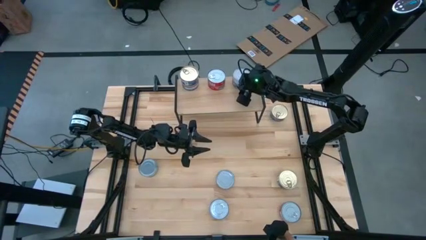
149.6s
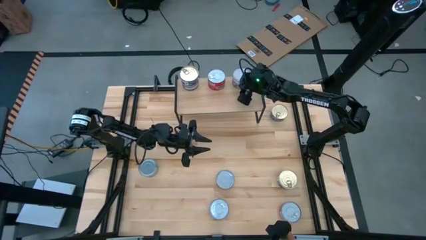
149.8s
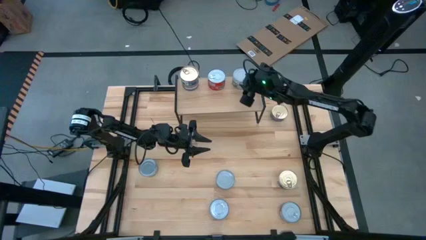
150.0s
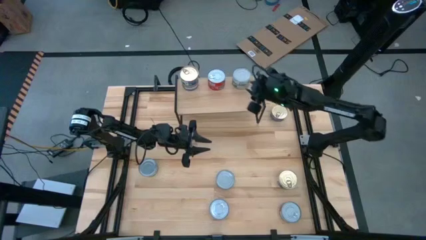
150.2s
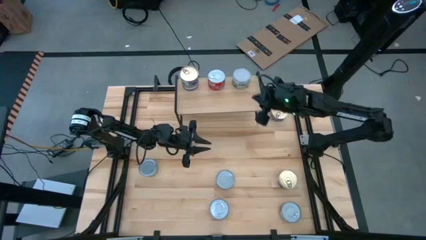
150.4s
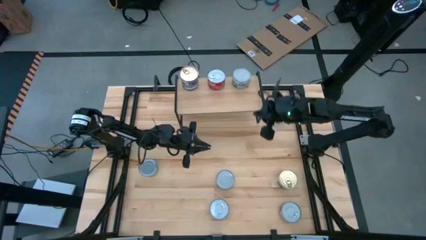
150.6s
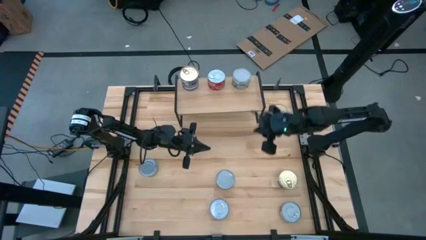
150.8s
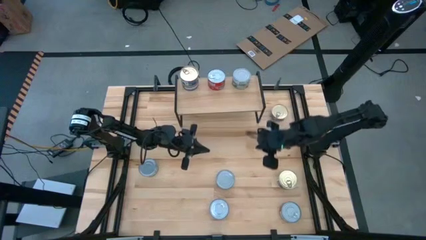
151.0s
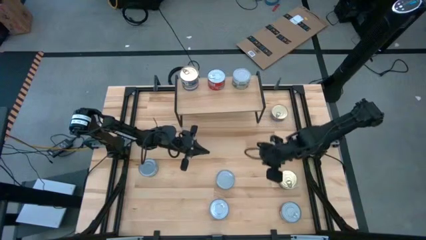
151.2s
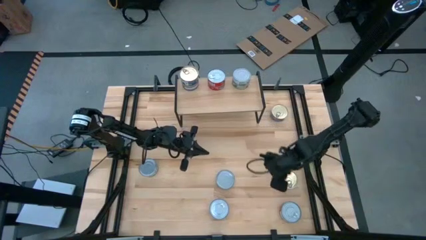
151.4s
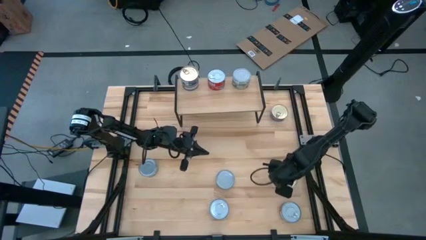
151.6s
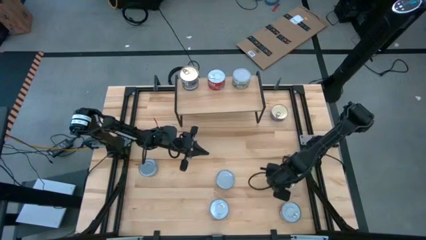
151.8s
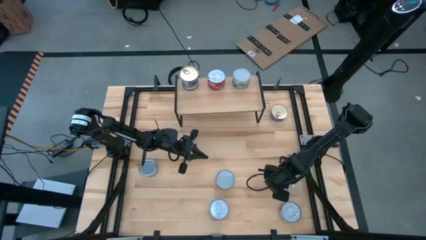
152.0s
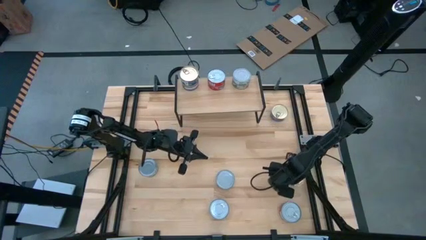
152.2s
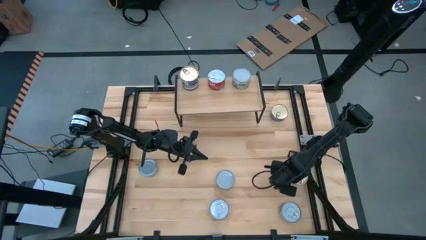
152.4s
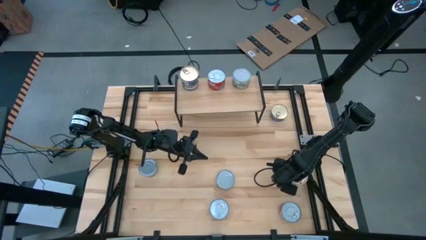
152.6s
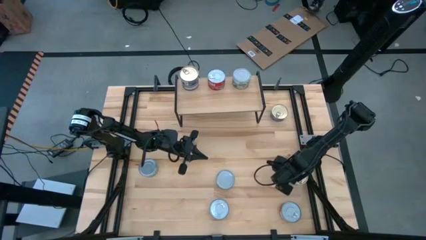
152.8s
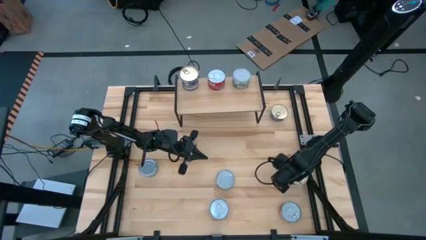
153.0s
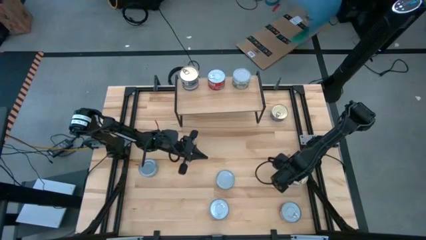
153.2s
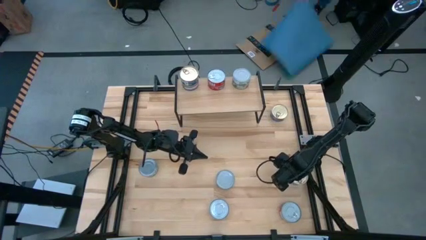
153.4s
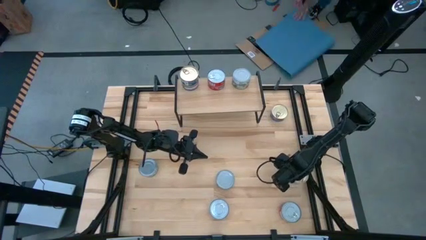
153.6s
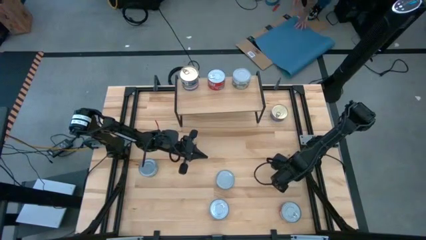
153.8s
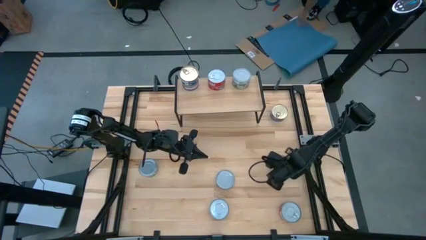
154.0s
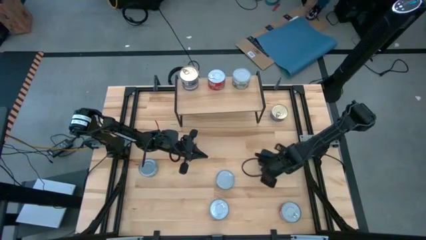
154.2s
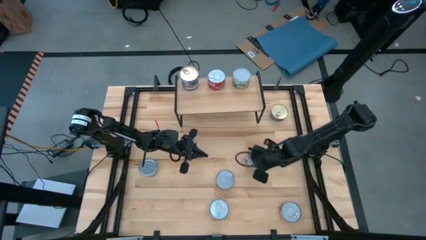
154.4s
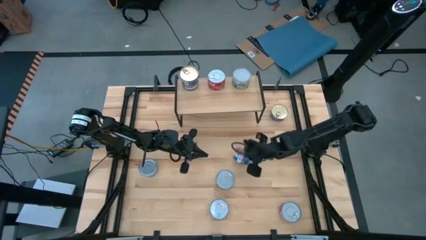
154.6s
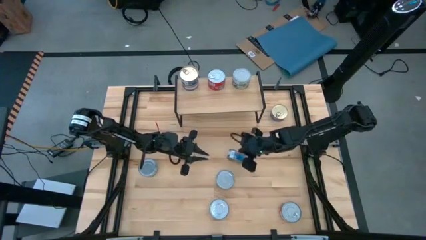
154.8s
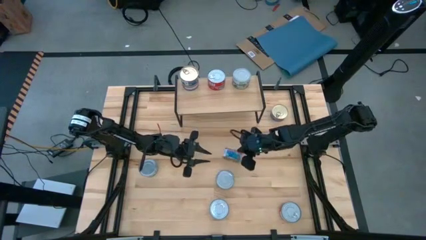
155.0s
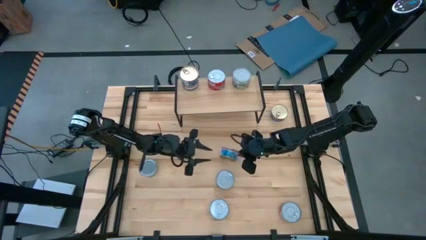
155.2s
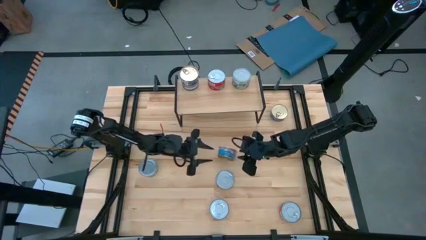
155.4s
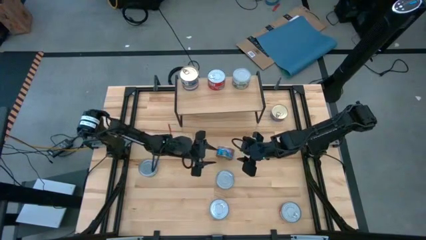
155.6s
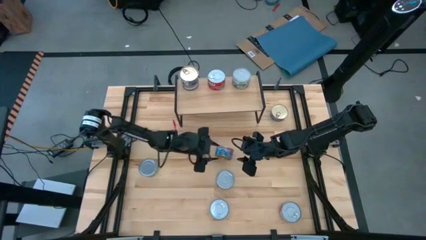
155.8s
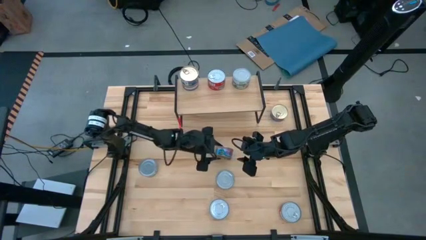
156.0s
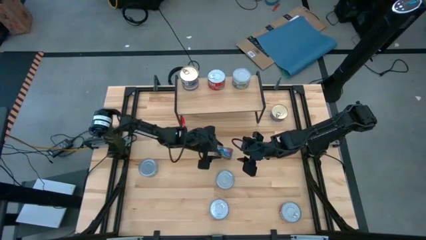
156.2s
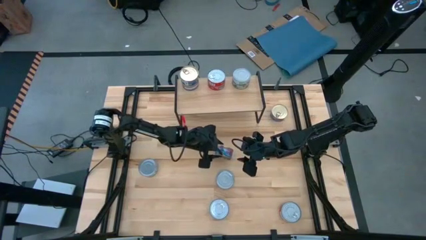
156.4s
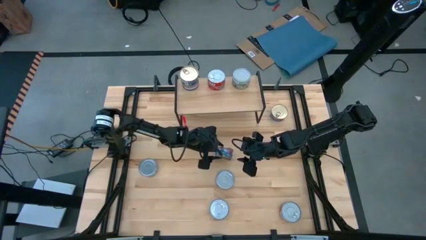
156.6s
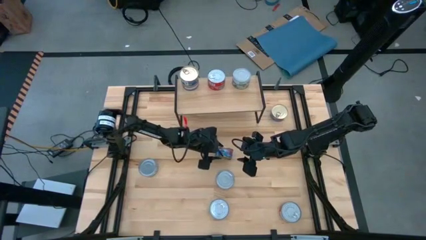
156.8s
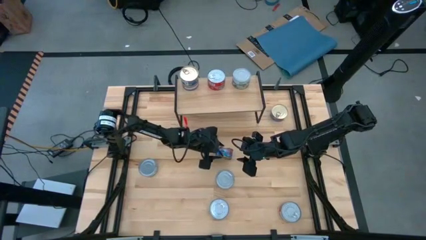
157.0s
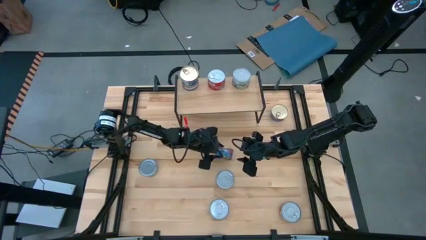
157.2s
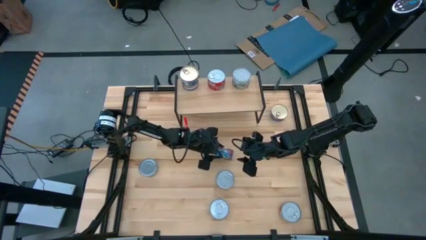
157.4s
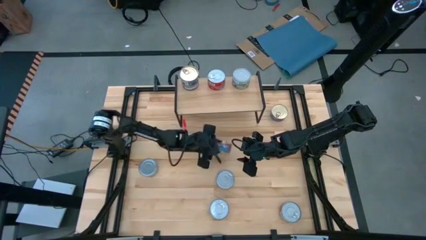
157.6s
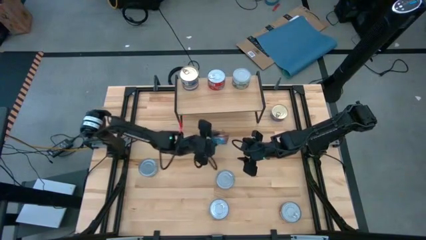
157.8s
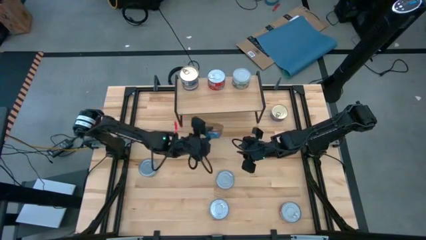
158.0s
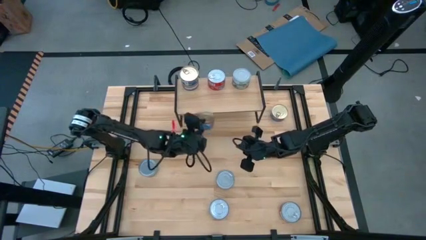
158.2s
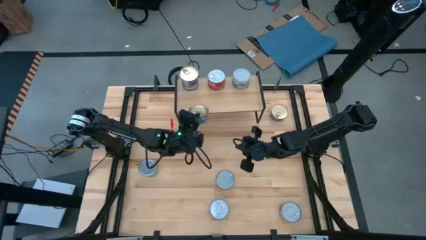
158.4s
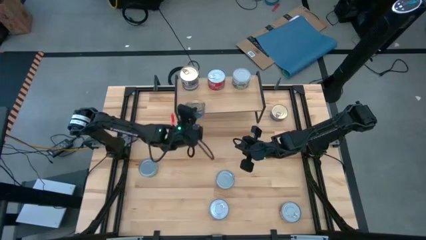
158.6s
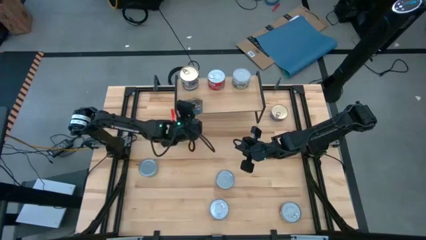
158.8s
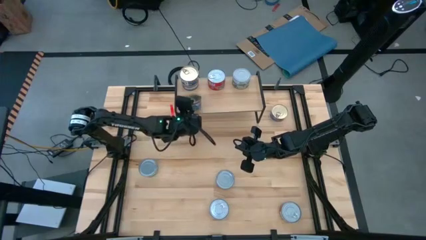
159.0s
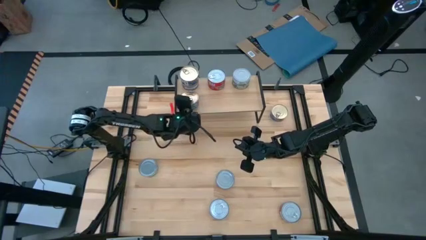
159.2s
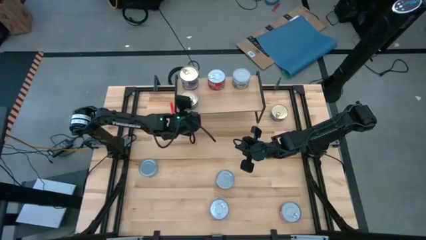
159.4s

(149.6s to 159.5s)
Task: Stack canned seafood by type on shelf
Put the blue pink tuna can on the shelf aligned with the other blue pink tuna can

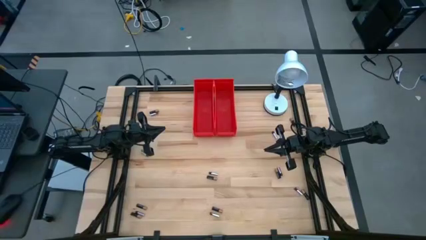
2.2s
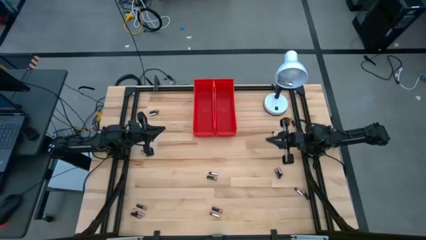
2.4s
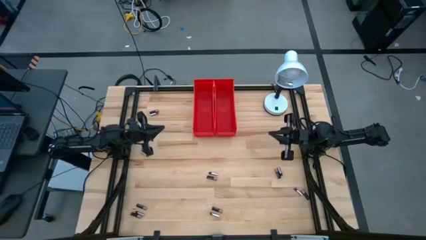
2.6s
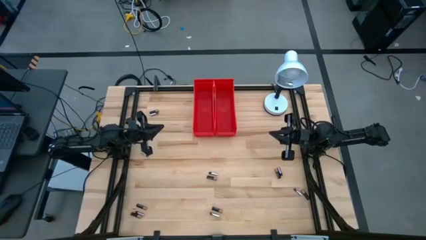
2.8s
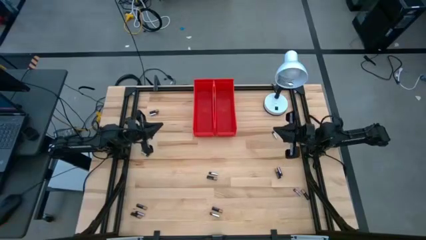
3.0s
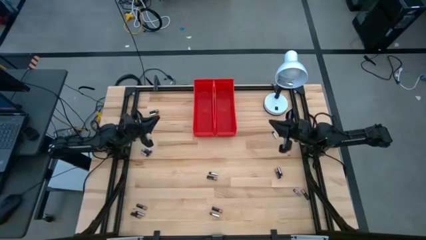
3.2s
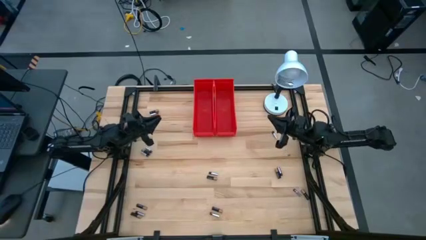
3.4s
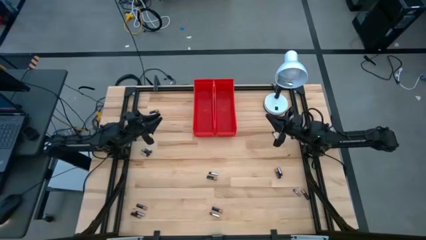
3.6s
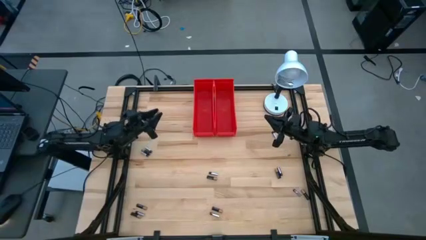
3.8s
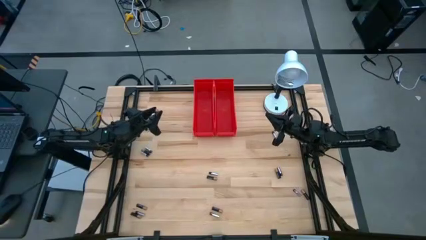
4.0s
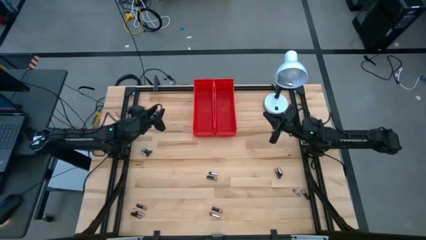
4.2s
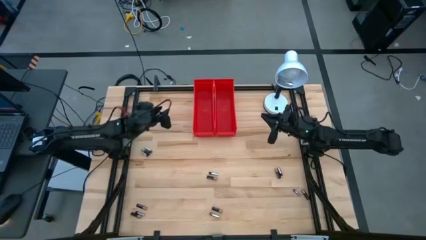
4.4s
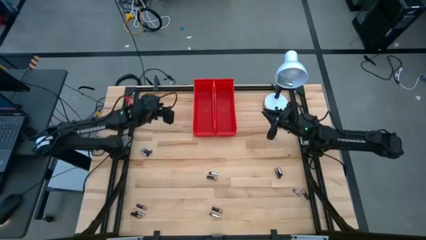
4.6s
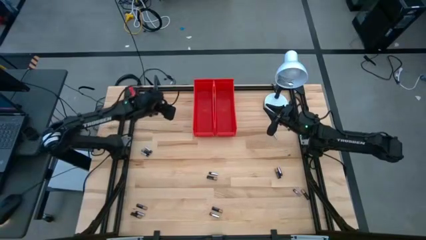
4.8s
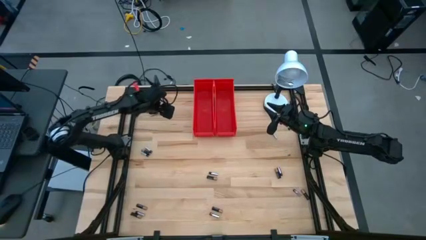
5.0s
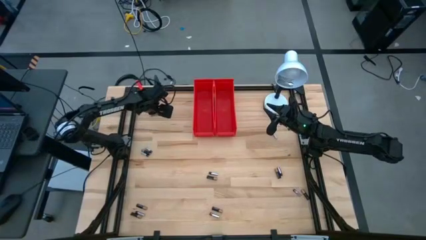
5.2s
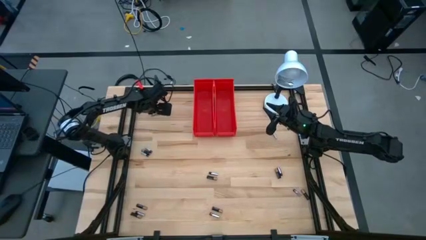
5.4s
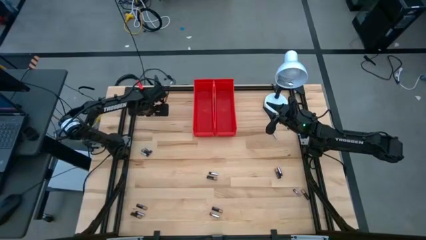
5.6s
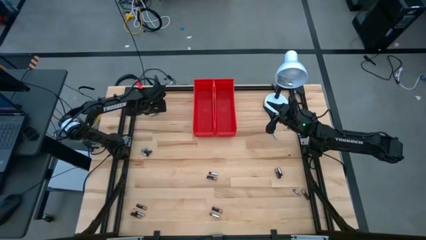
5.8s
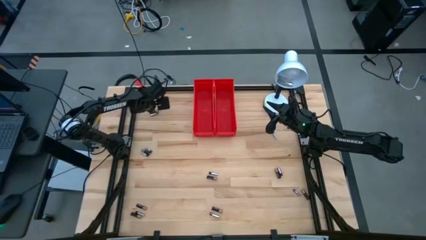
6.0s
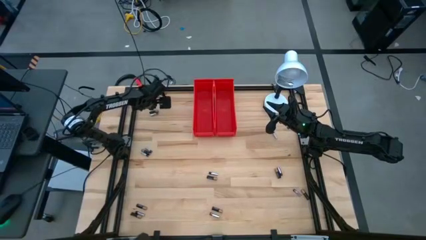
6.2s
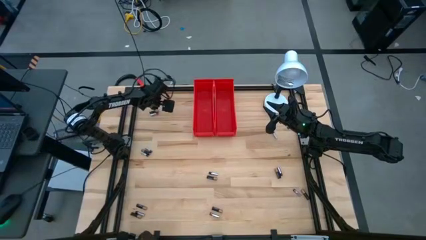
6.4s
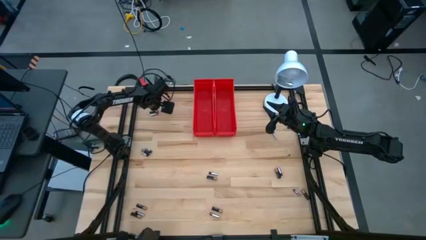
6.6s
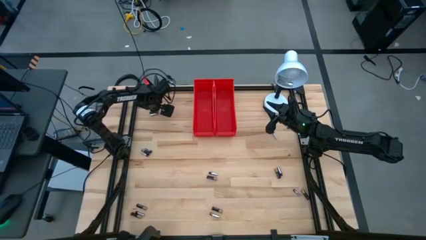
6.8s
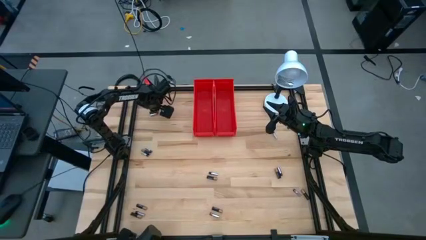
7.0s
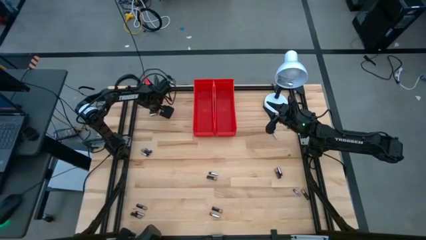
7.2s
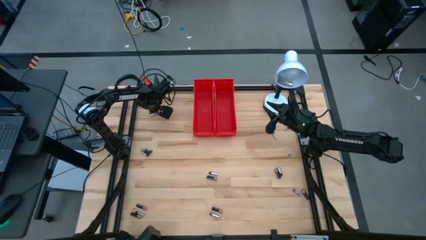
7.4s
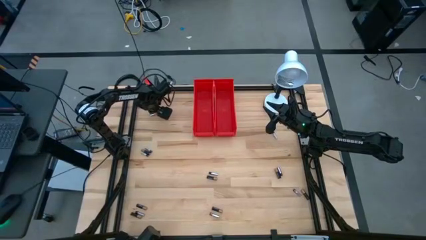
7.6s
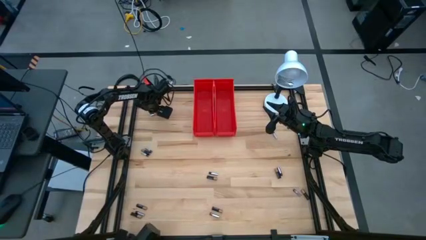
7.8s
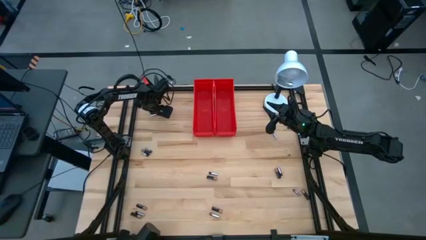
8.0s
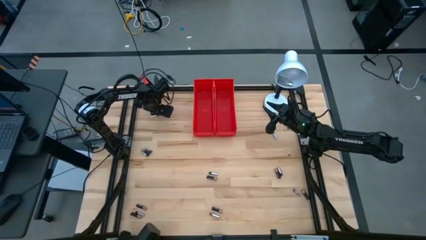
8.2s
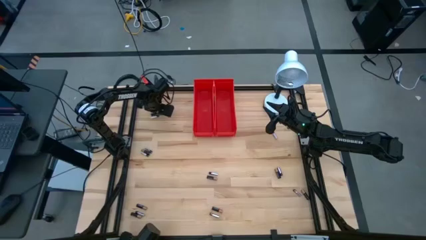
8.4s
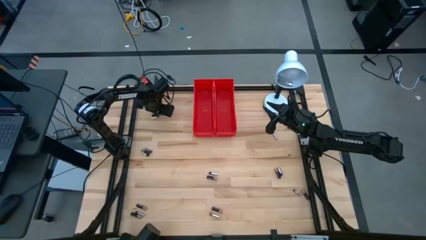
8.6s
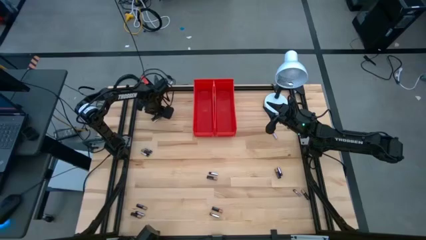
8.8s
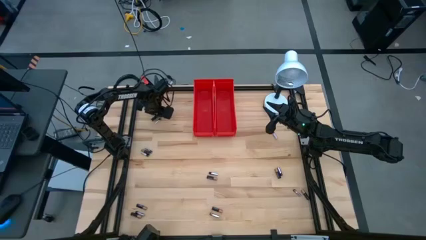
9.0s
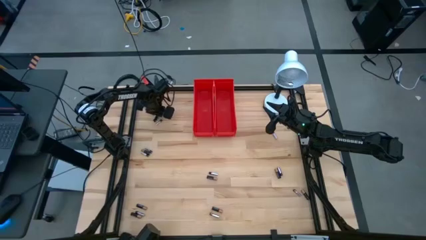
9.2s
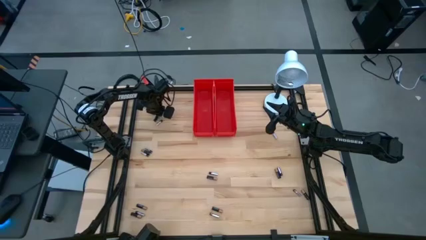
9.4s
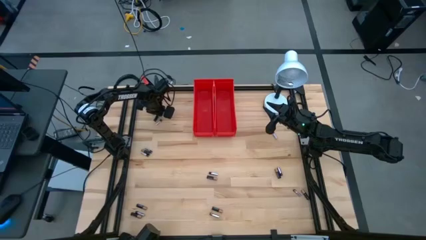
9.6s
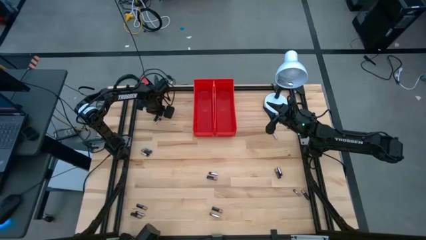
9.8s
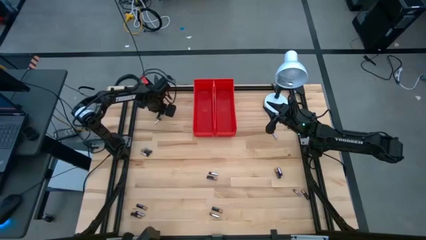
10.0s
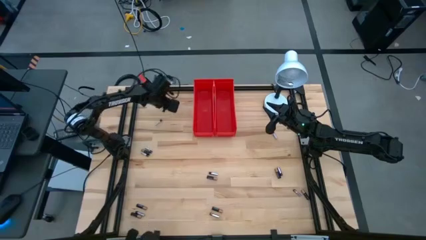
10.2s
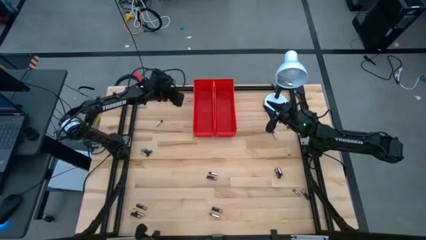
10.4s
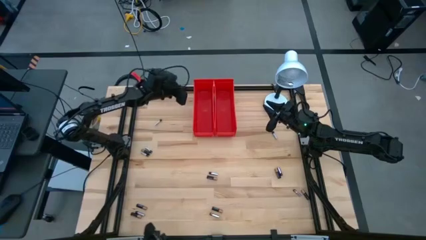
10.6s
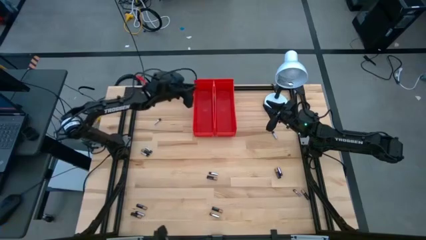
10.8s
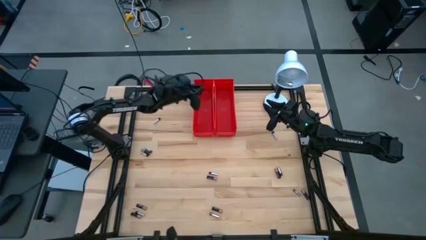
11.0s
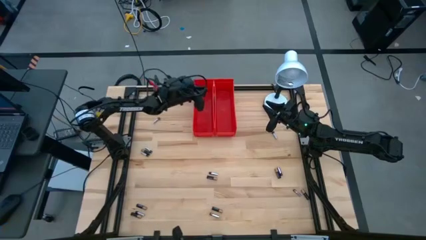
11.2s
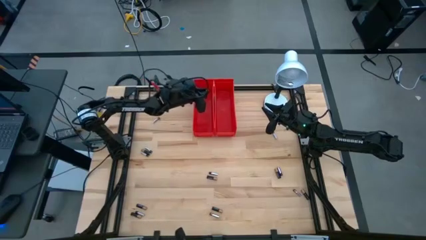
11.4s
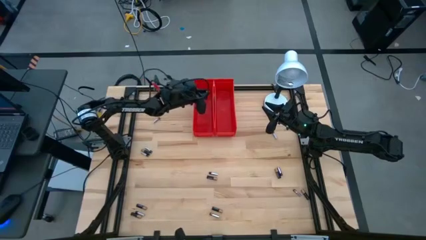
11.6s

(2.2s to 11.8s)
Task: Sort batteries
Put the black battery into the left red bin
